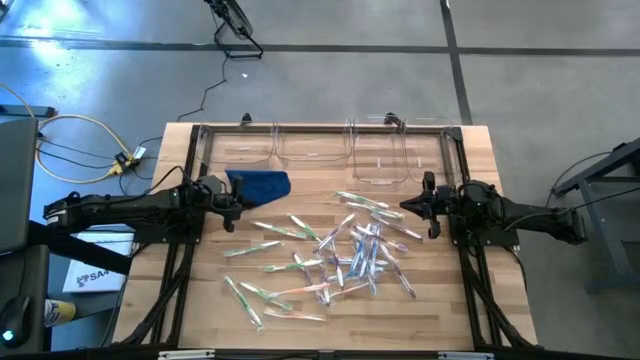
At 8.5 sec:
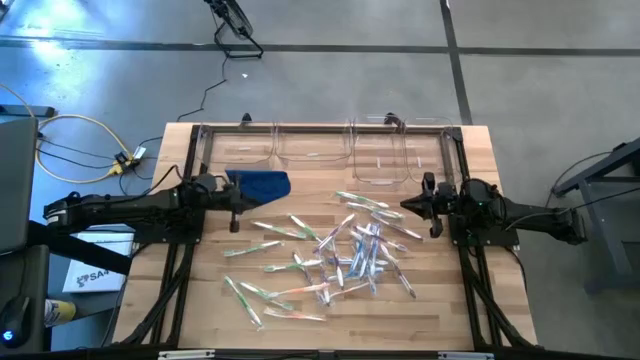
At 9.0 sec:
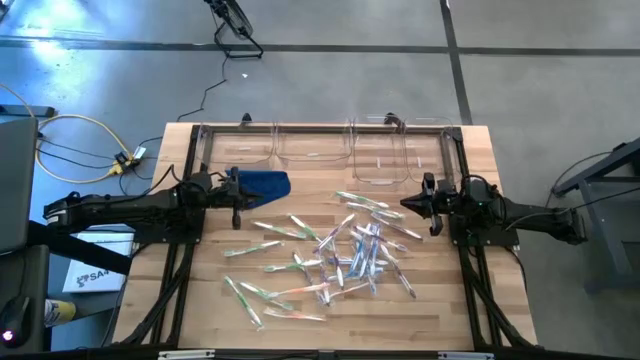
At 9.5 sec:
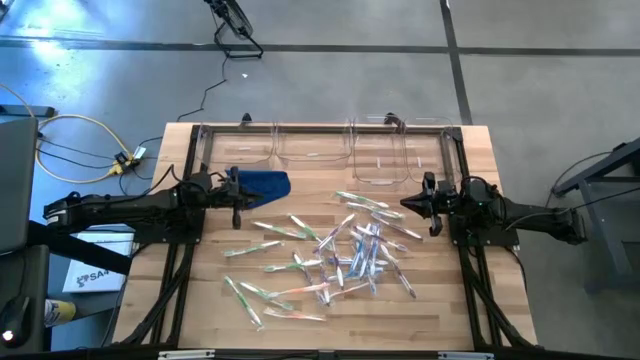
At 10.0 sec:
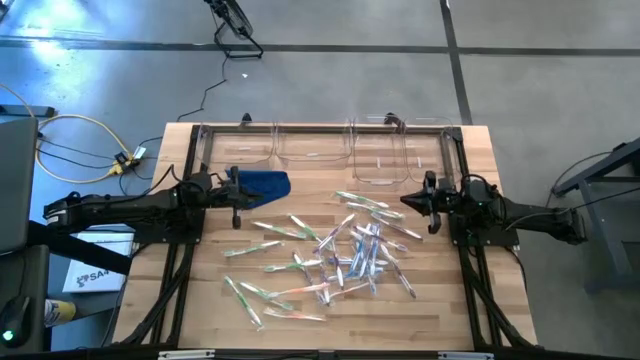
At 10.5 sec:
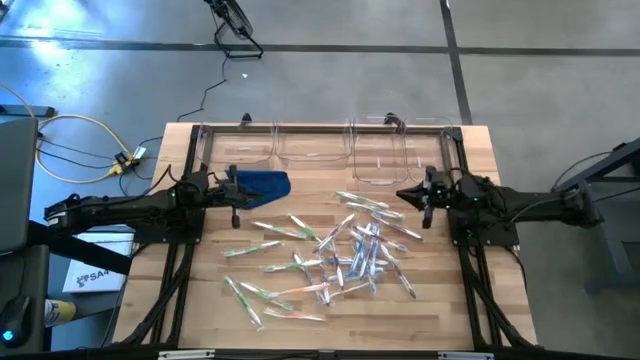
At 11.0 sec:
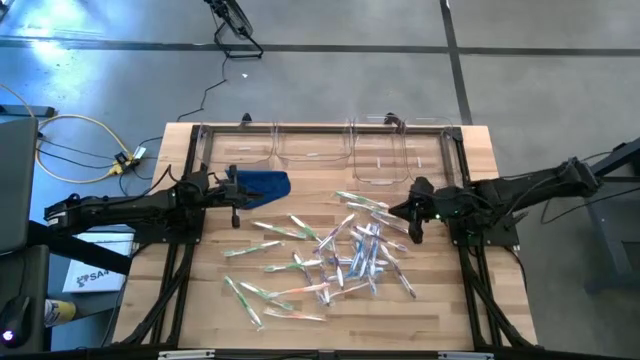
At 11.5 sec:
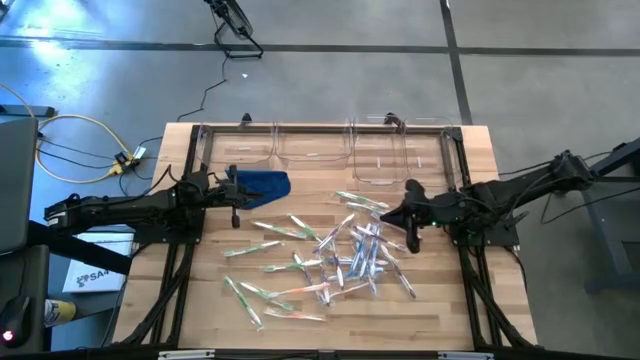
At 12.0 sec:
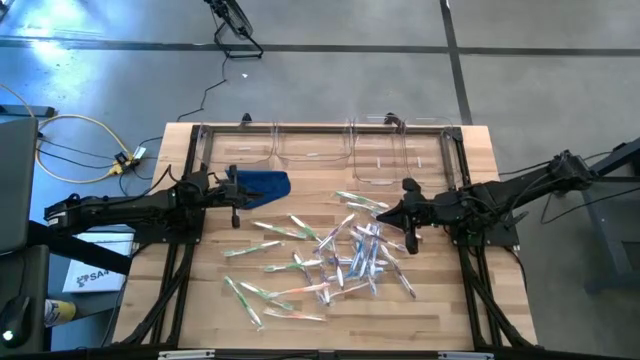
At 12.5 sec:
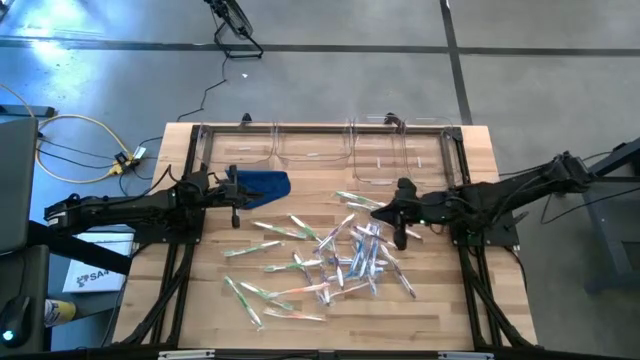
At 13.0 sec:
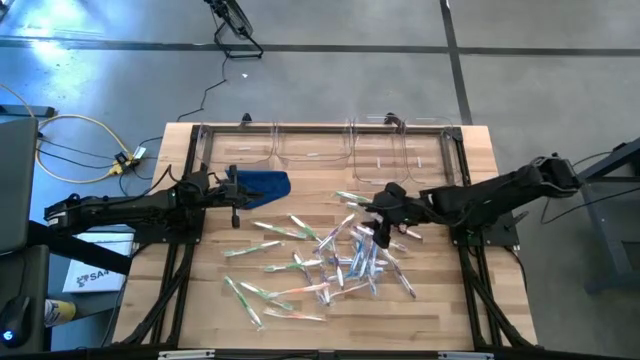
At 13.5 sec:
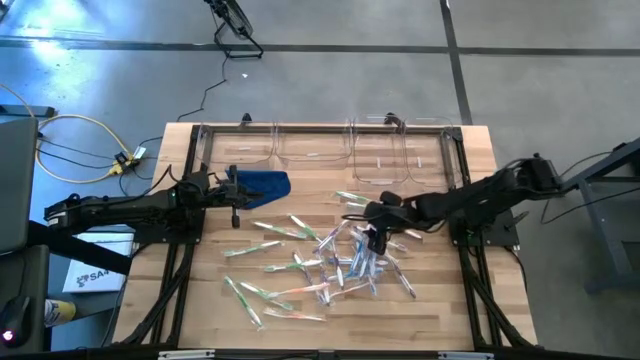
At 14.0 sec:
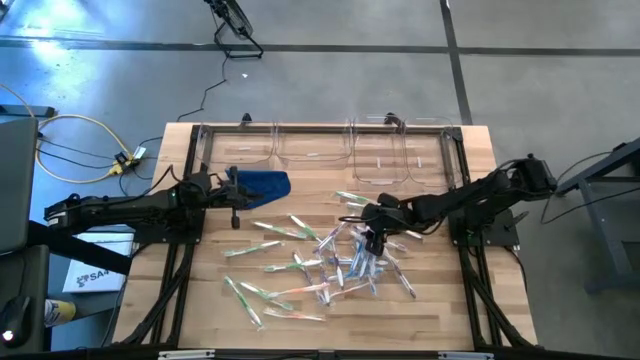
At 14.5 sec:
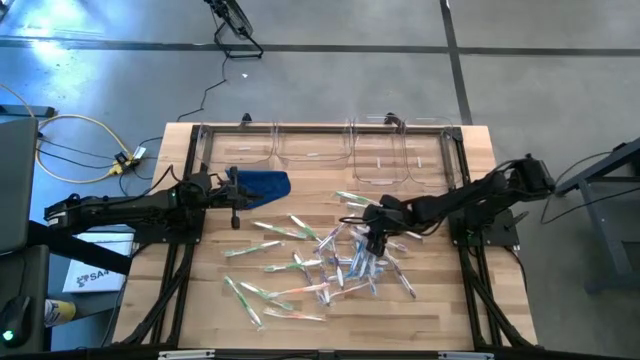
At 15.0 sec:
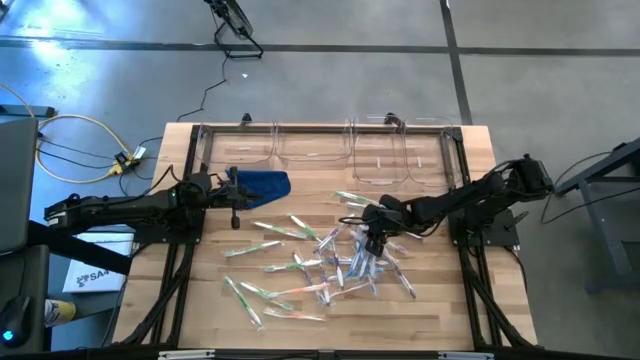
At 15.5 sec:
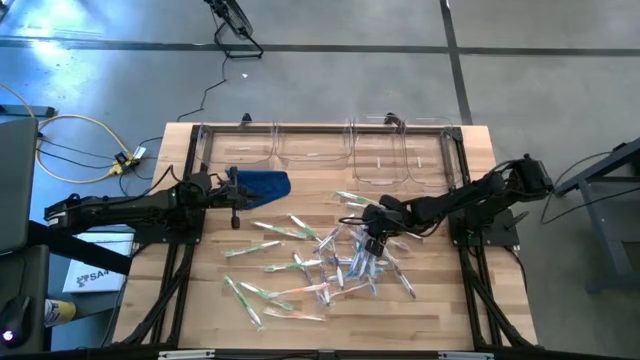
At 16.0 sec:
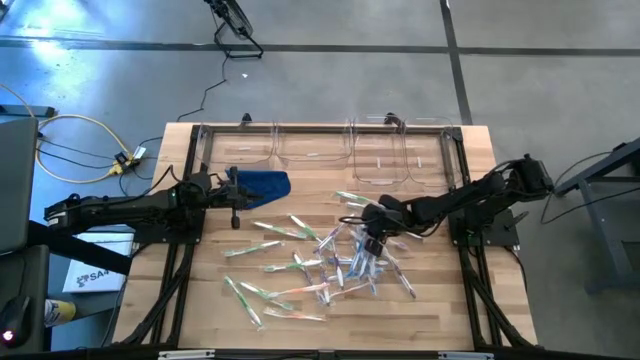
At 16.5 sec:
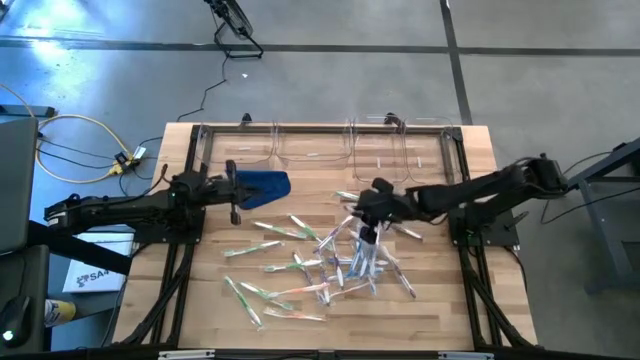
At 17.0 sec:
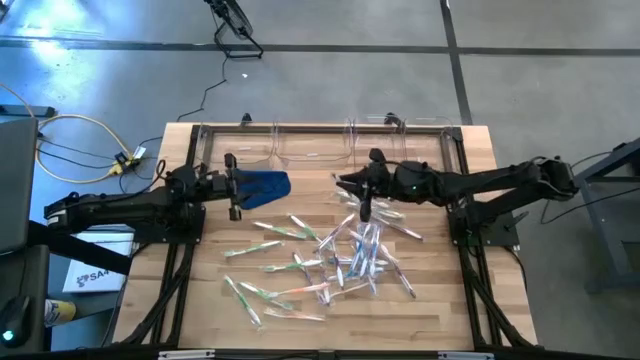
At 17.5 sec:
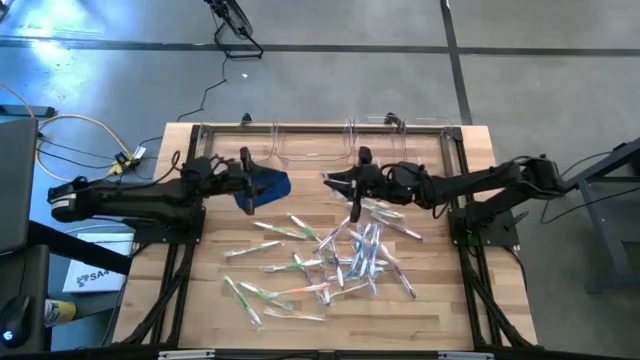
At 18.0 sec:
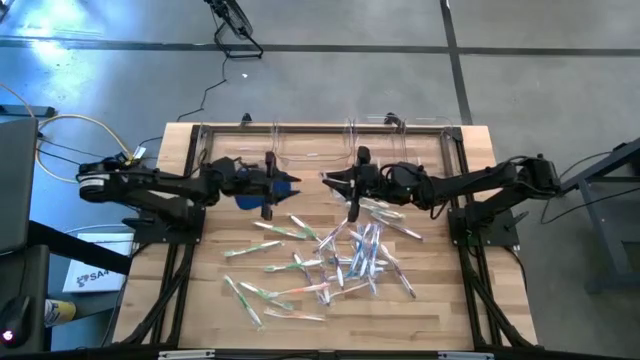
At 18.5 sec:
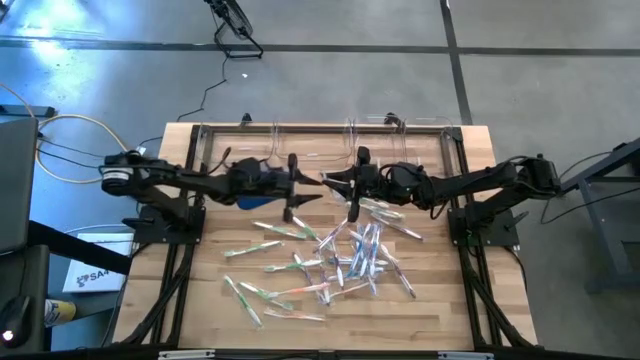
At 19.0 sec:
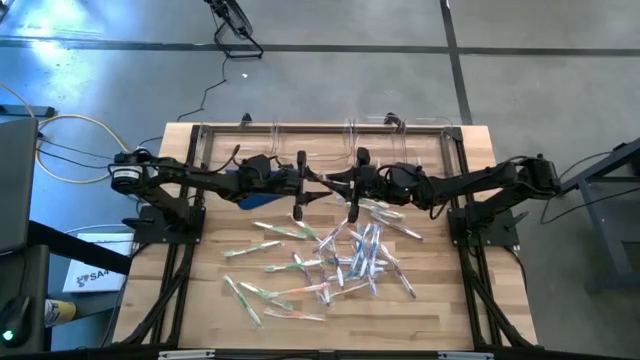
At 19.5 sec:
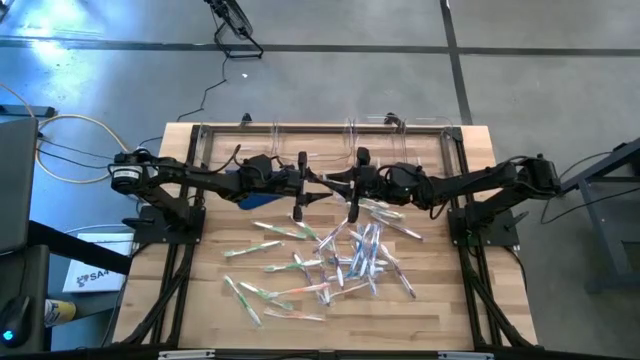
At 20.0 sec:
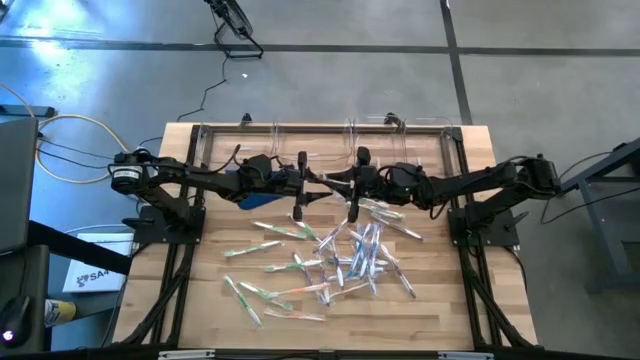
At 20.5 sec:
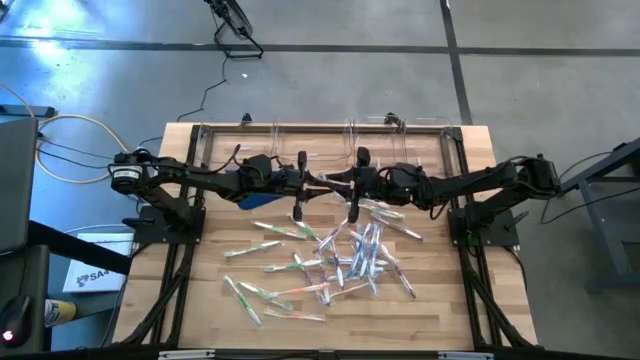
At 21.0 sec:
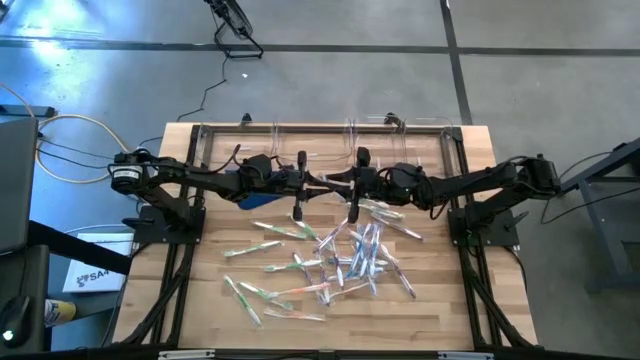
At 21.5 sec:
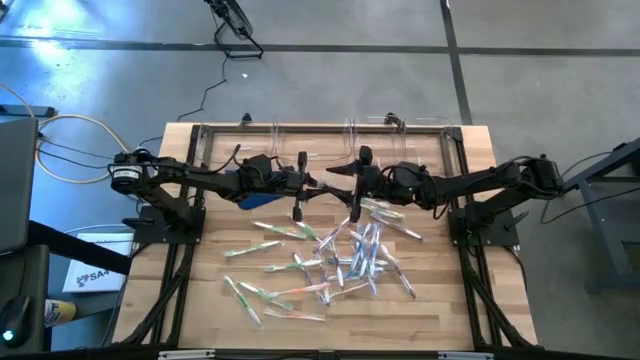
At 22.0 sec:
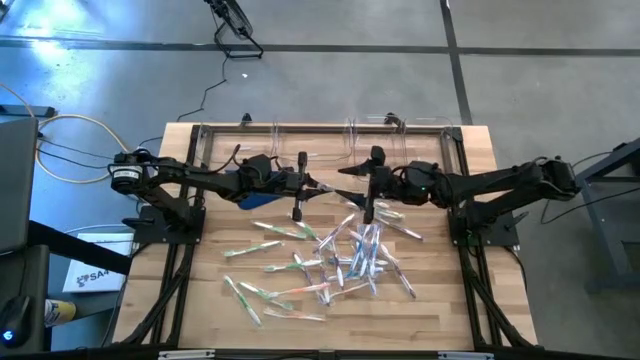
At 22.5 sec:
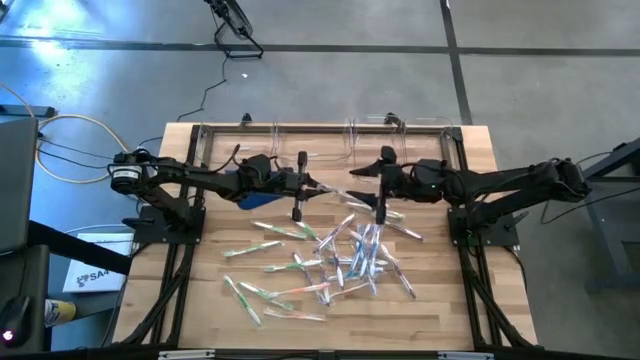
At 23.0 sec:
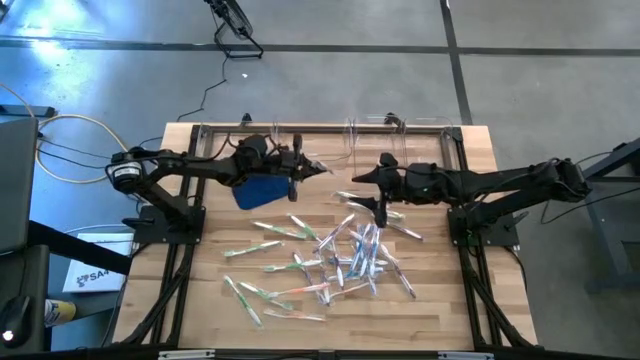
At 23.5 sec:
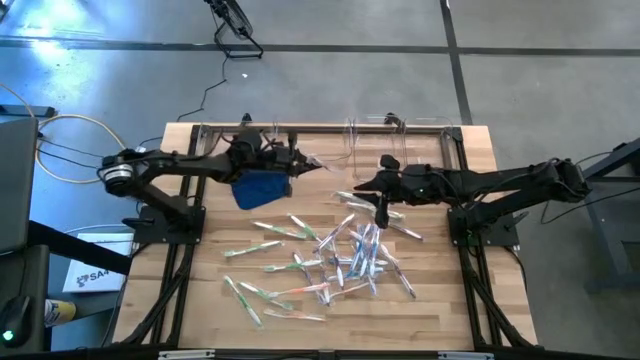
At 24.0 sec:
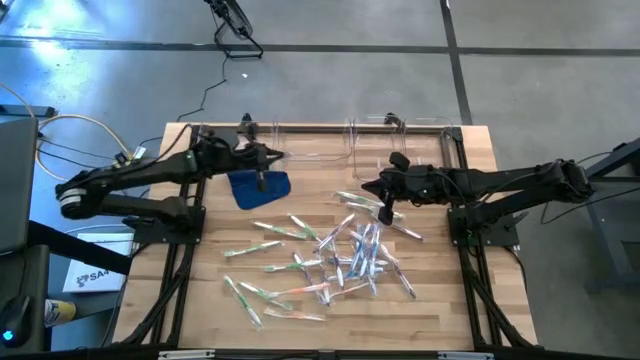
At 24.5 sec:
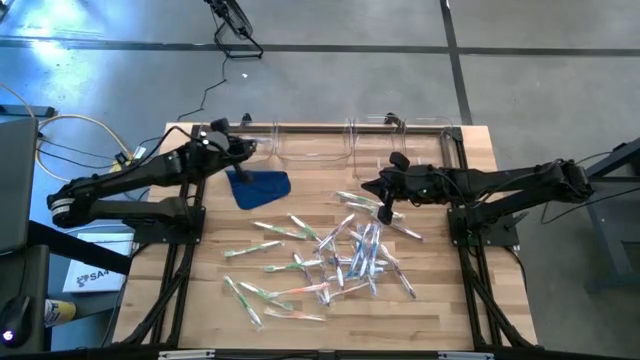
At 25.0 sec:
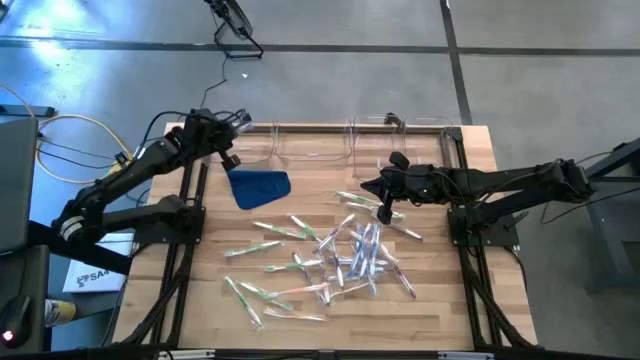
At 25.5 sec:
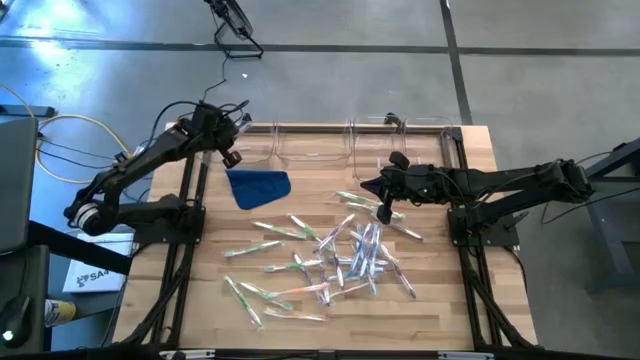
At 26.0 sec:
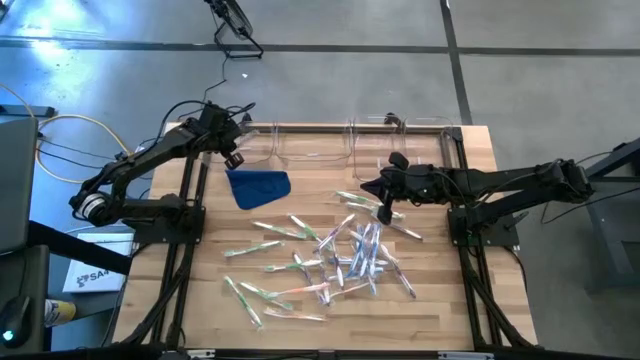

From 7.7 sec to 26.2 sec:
Task: Pick & Place Toothbrushes
Put the violet toothbrush into the left transparent bin
